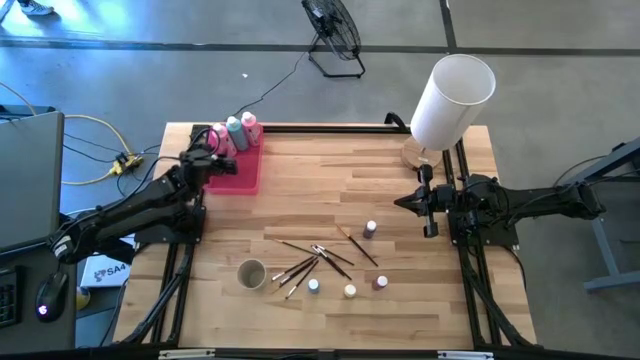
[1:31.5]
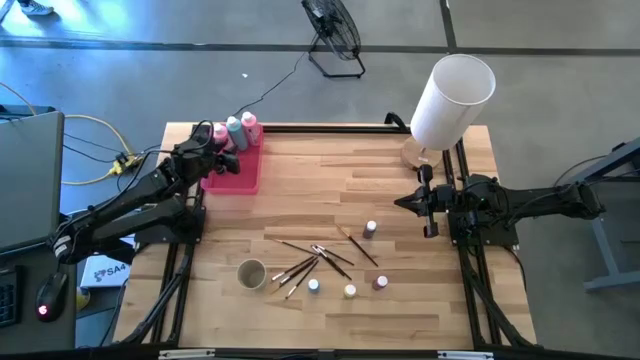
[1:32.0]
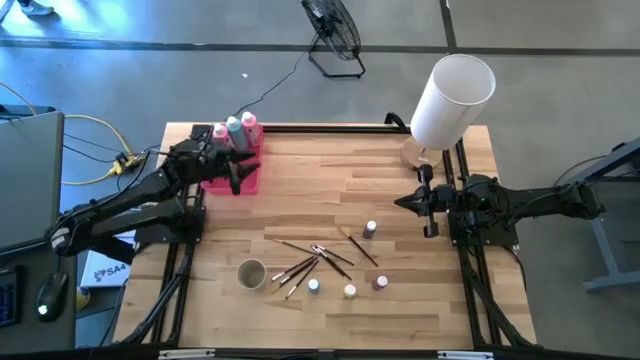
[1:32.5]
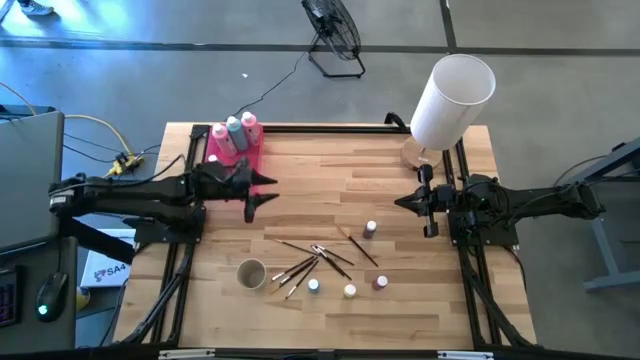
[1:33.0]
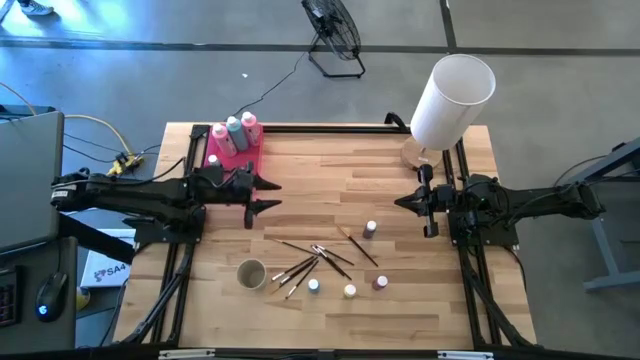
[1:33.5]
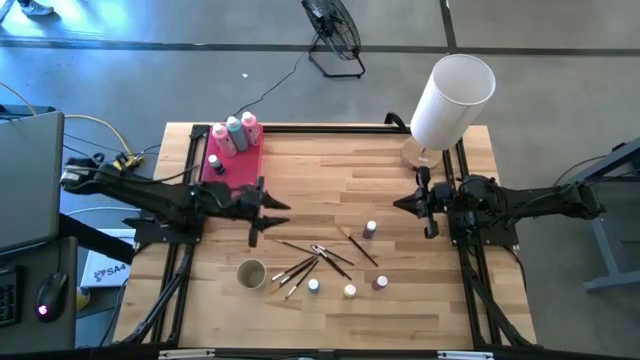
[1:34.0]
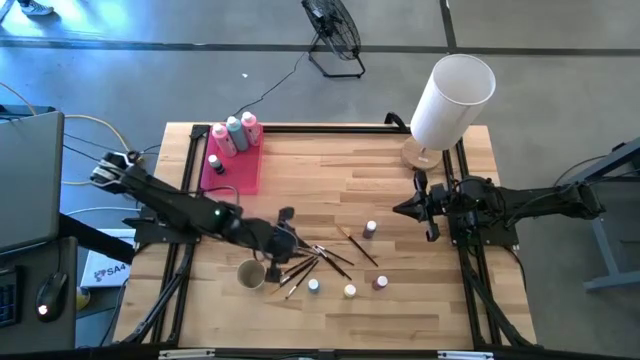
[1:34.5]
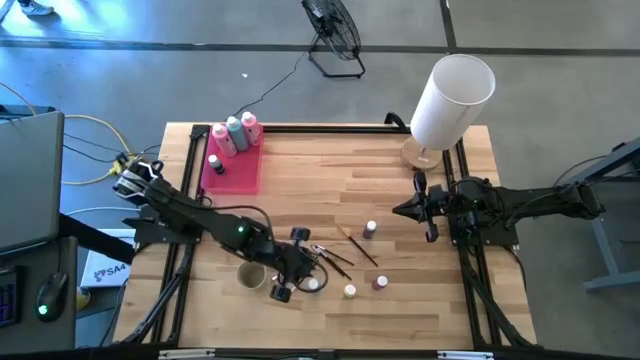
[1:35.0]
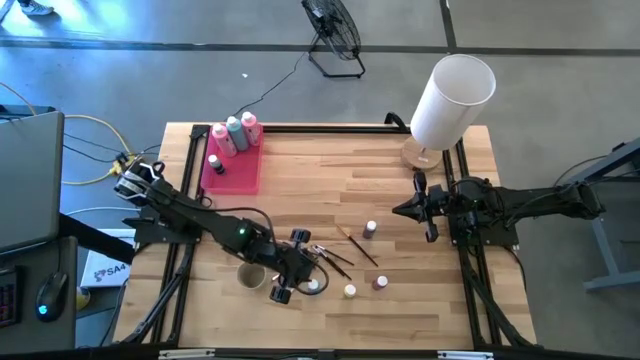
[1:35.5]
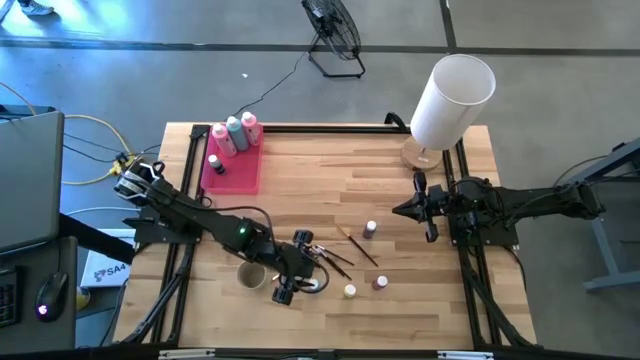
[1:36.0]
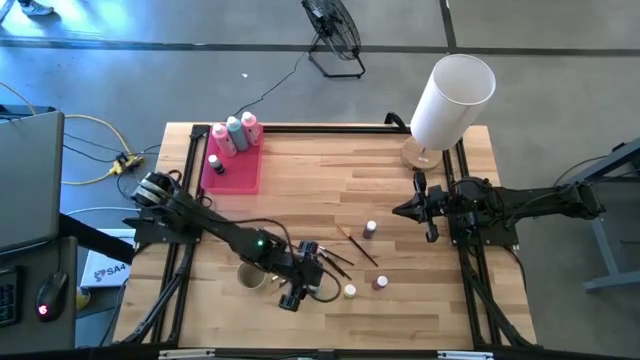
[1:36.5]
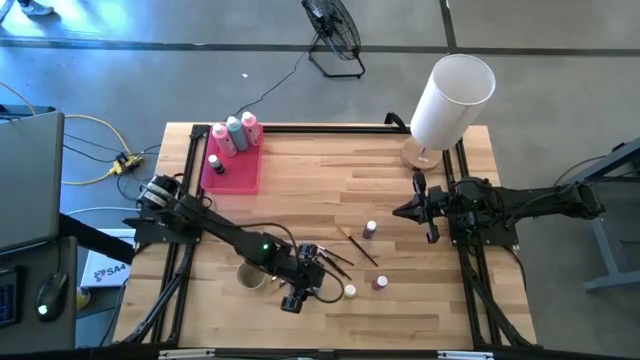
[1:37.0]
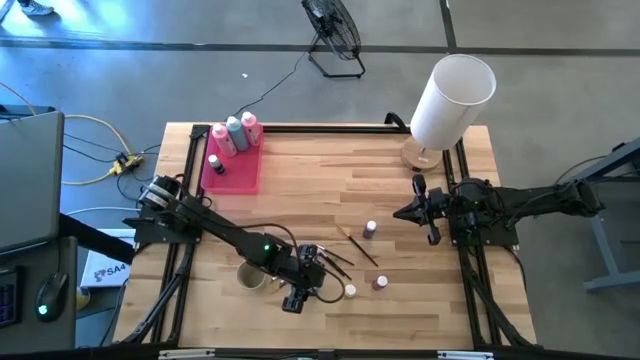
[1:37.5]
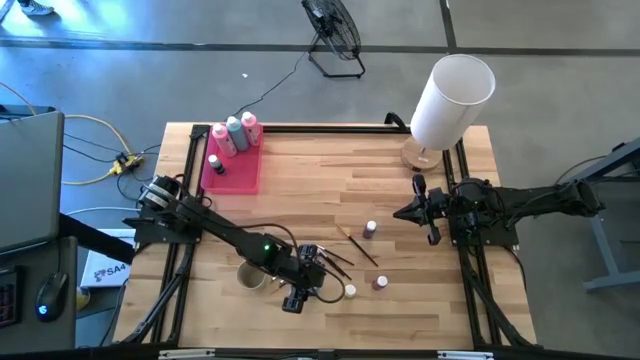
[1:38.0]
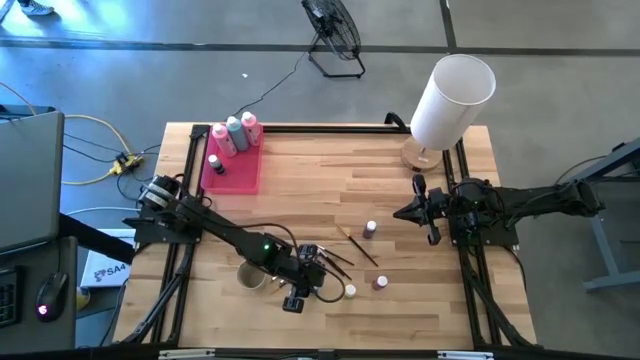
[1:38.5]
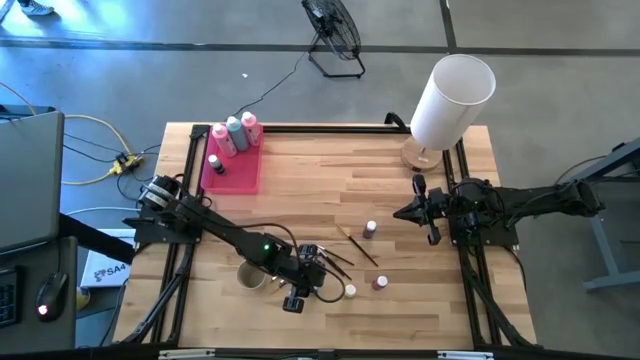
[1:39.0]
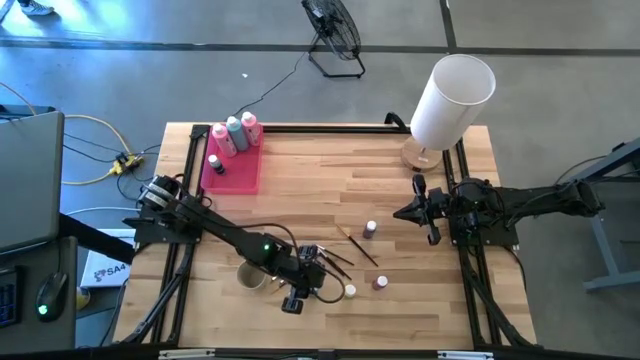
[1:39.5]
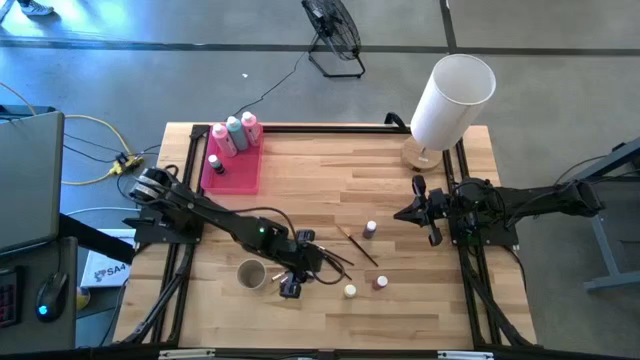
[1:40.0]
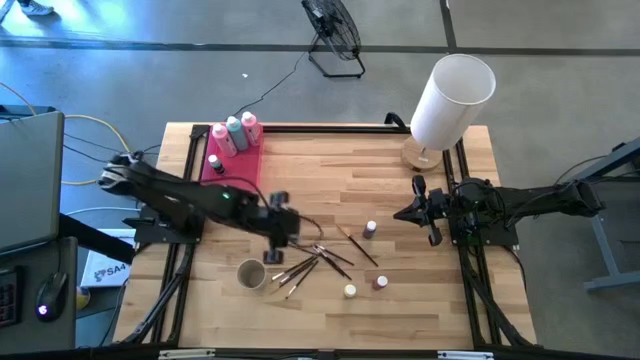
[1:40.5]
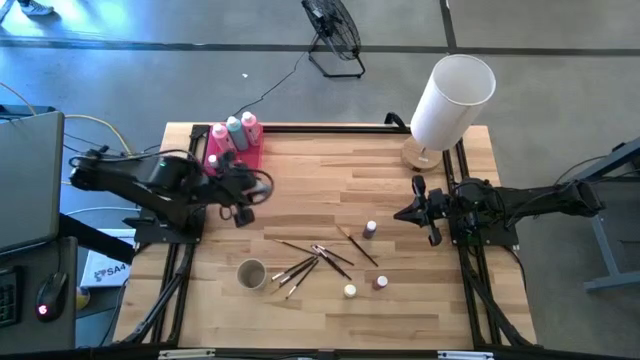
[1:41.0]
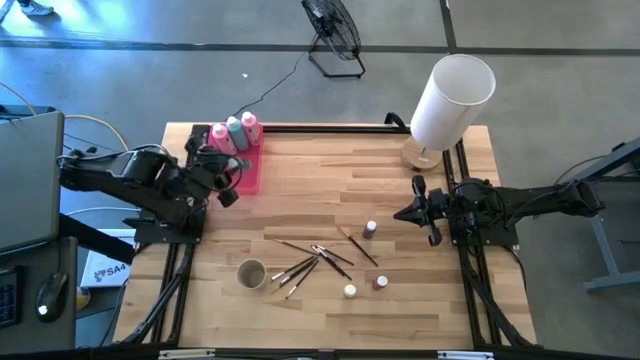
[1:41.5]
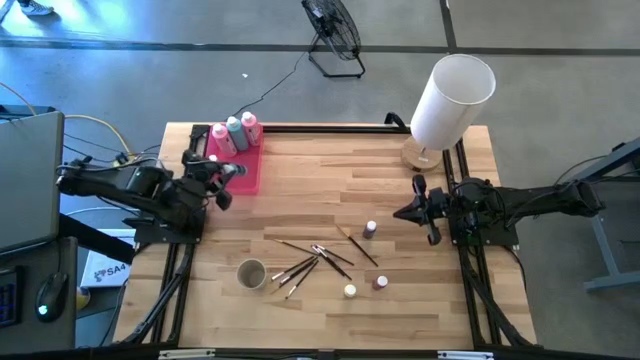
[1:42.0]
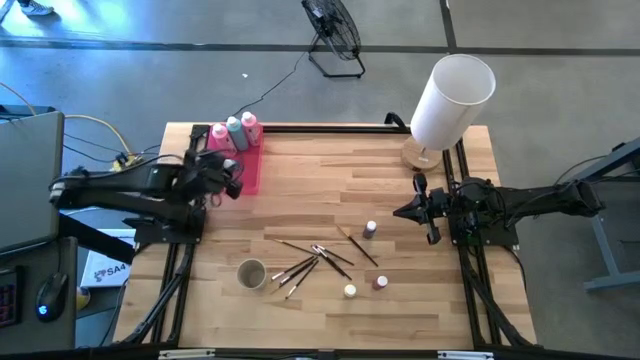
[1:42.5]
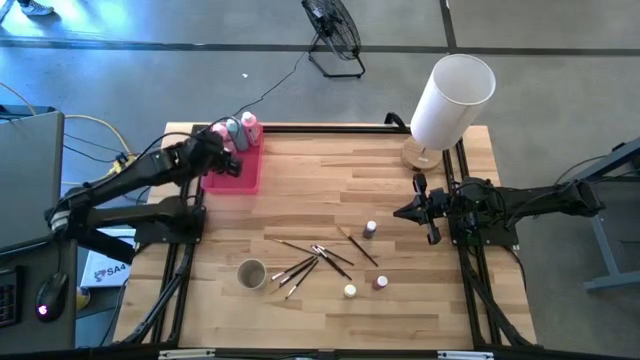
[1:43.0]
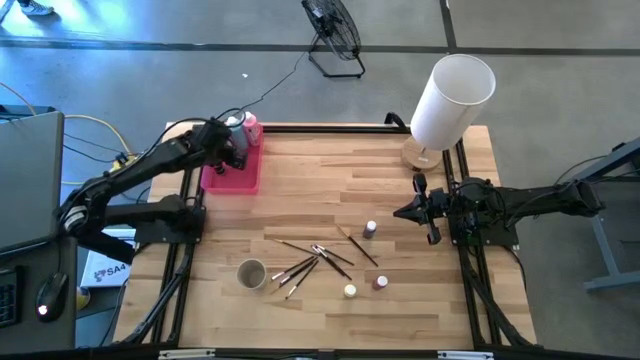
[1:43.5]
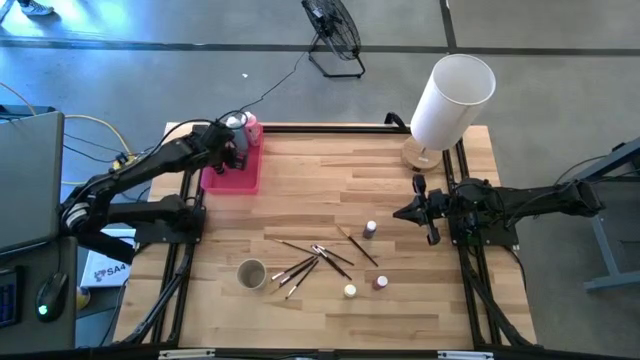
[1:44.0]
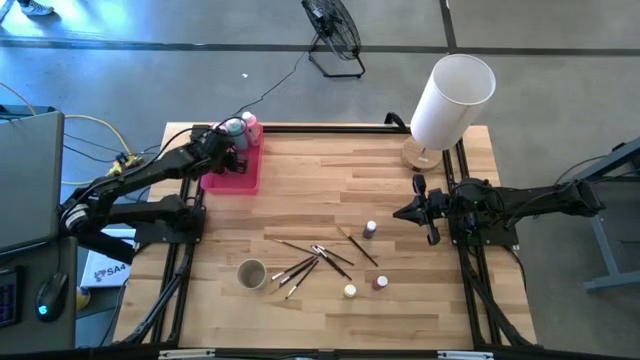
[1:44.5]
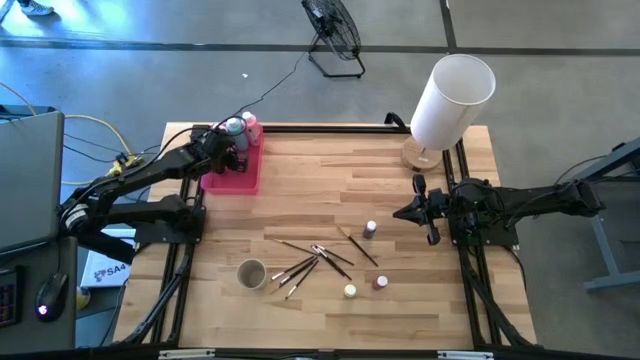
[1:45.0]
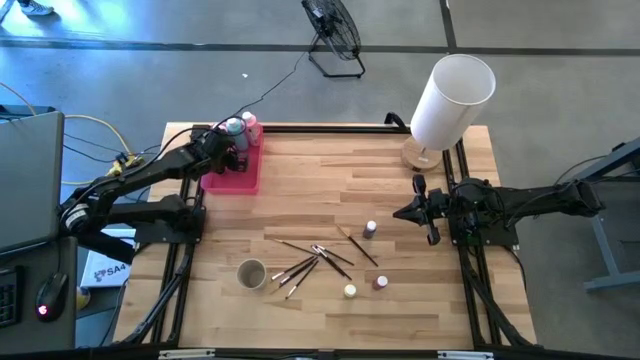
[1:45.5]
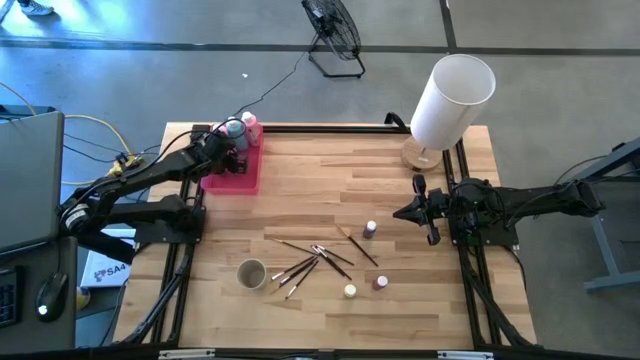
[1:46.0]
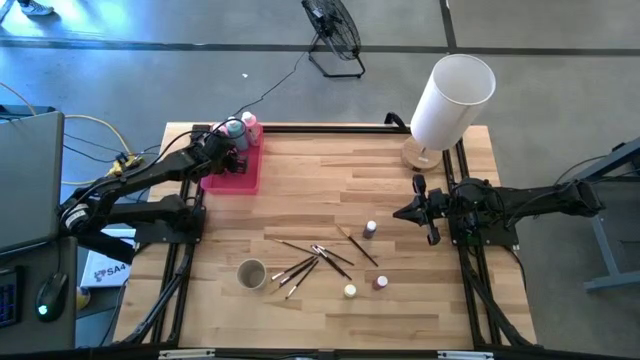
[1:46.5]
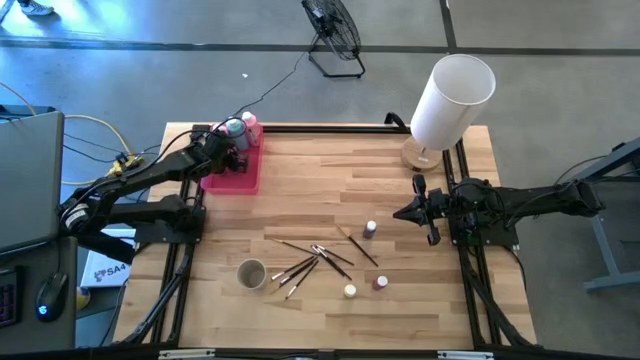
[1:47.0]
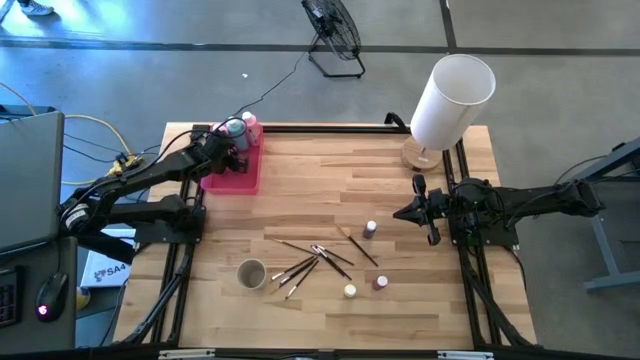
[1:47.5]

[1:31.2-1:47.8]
Task: Pick & Place Paint Supplies
Put the small light blue paint bottle into the pink bin

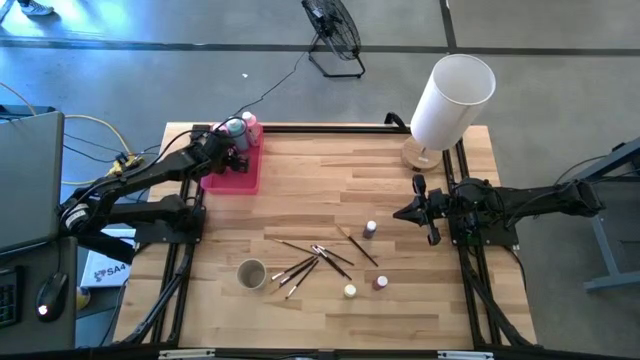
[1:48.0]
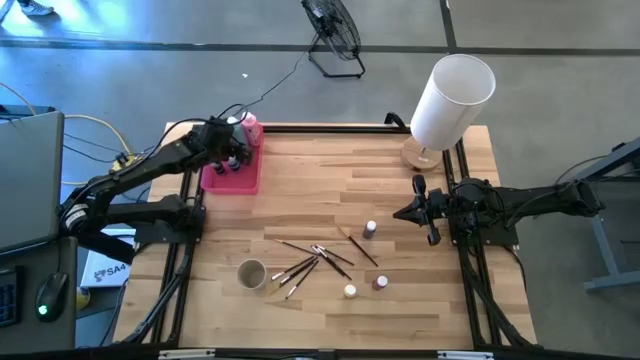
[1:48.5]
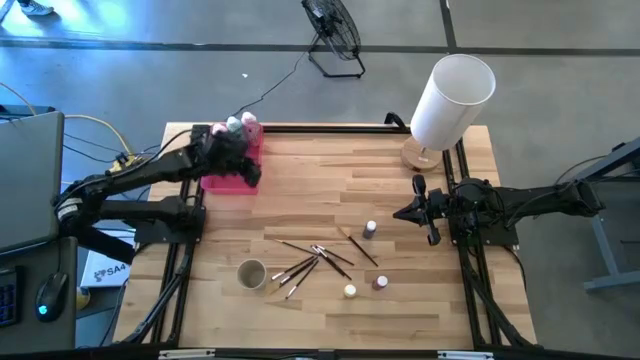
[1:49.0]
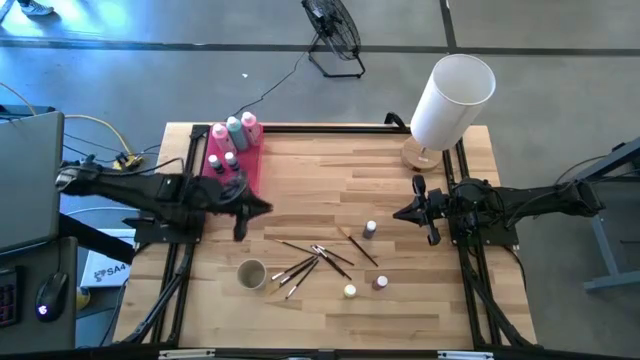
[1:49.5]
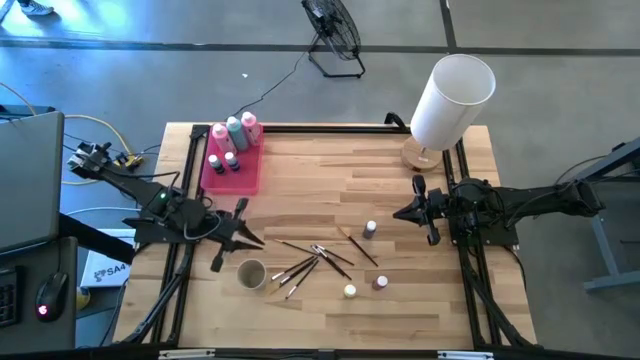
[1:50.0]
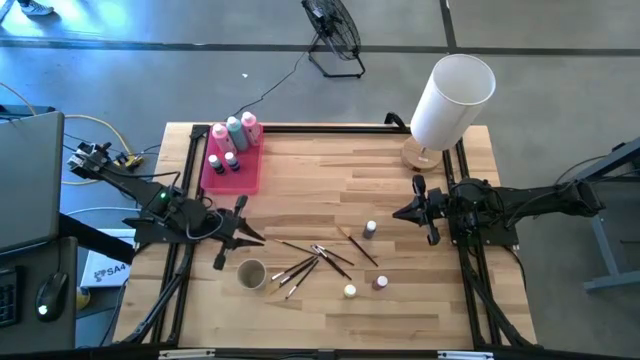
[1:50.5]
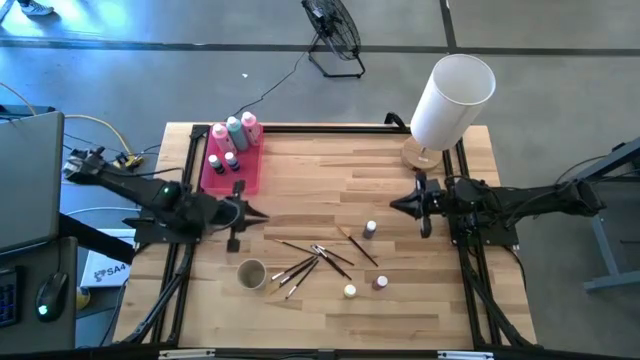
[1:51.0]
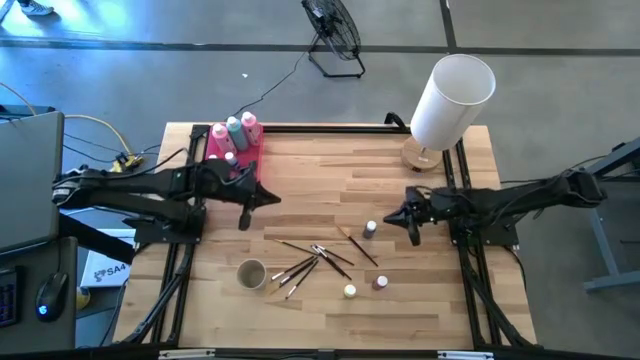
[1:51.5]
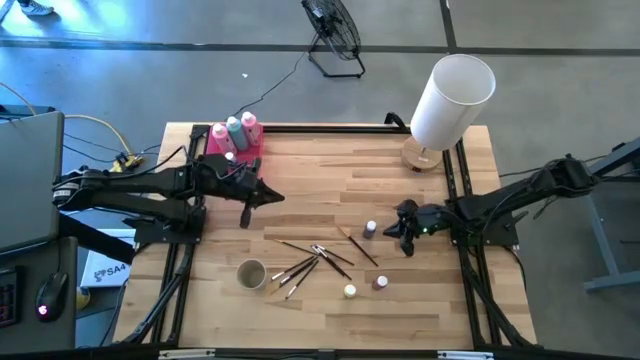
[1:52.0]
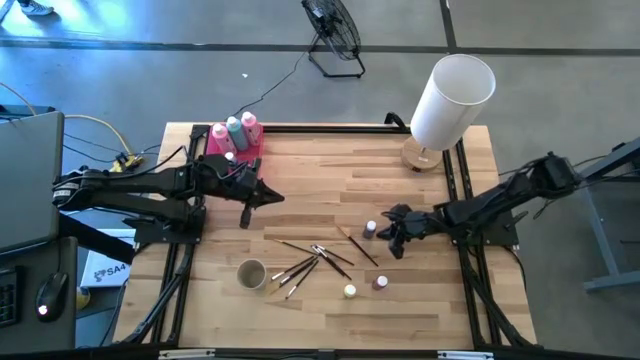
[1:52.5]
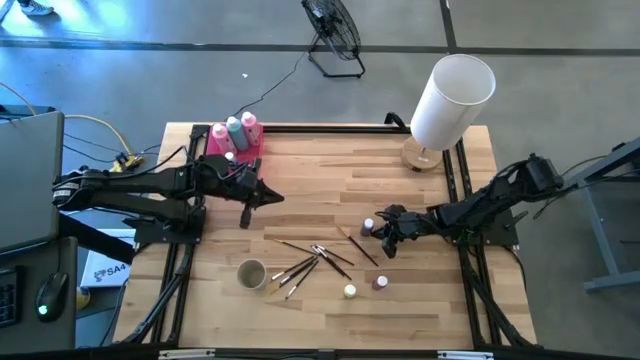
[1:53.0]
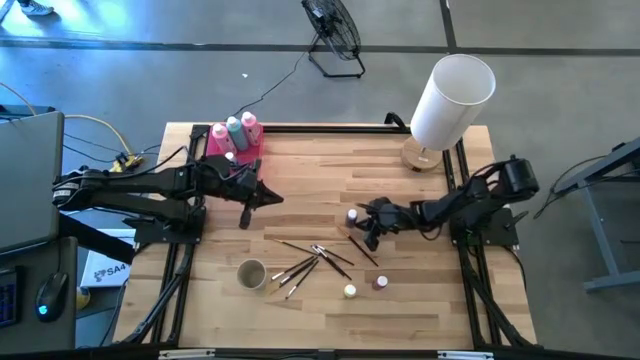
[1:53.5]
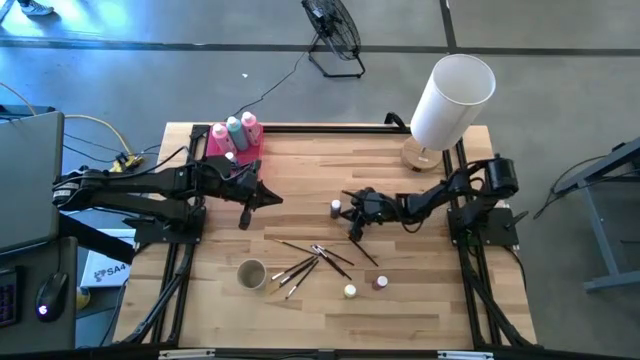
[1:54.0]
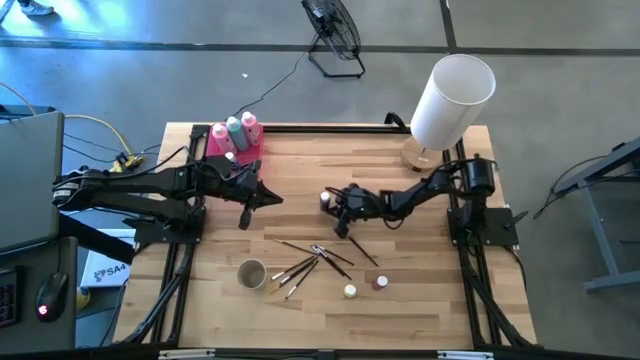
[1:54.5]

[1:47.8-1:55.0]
Move the small blue paint bottle to the center of the table
